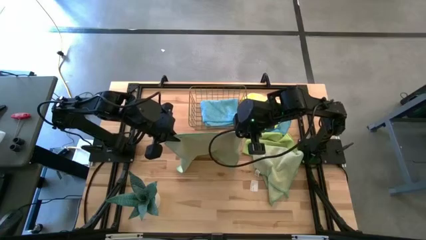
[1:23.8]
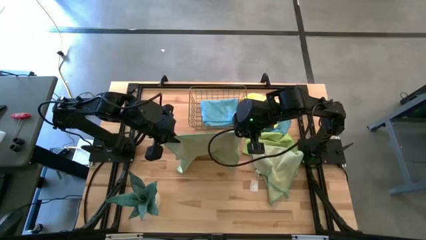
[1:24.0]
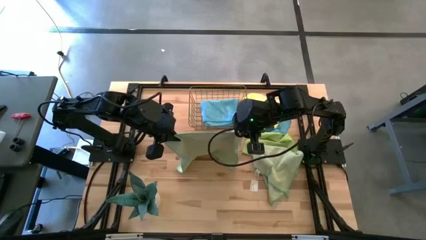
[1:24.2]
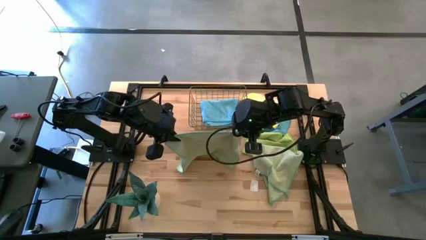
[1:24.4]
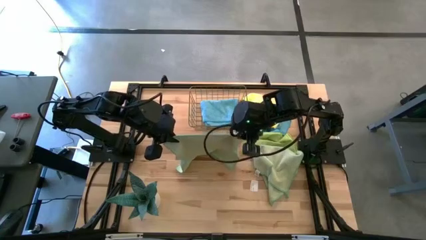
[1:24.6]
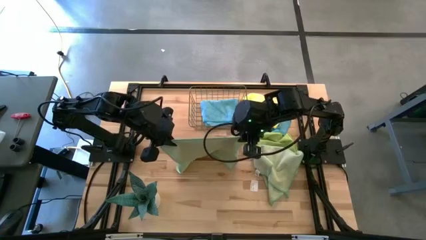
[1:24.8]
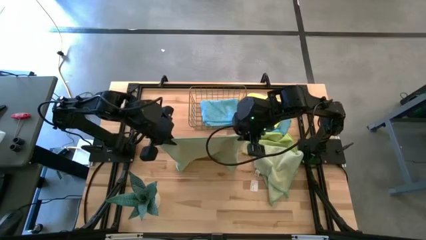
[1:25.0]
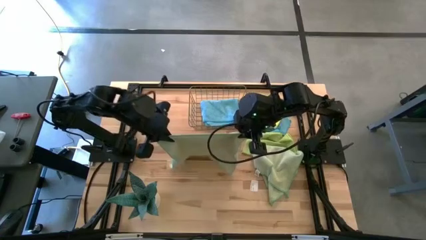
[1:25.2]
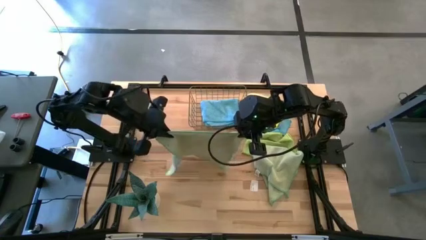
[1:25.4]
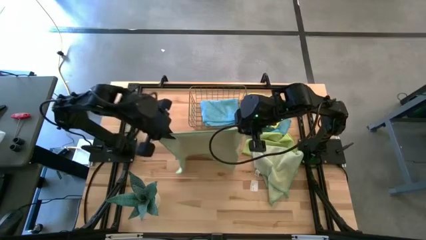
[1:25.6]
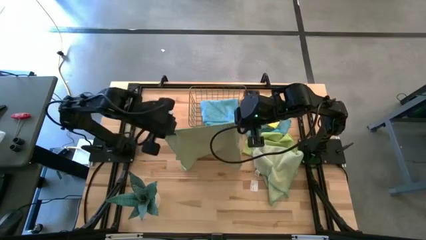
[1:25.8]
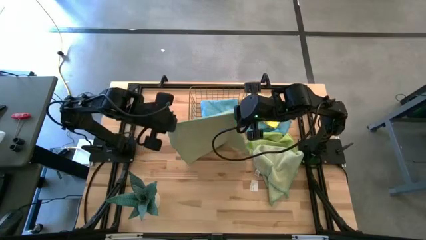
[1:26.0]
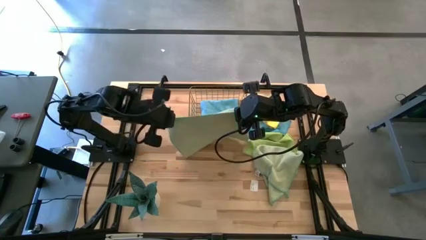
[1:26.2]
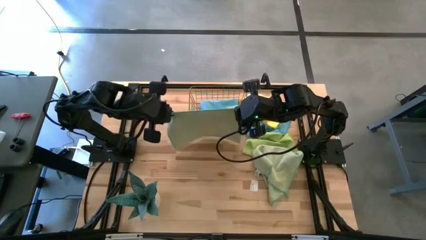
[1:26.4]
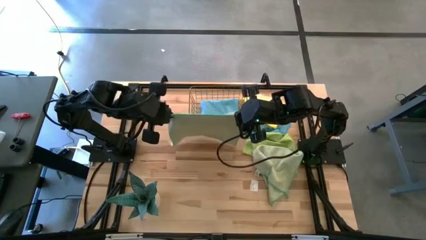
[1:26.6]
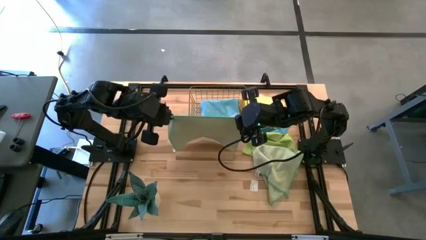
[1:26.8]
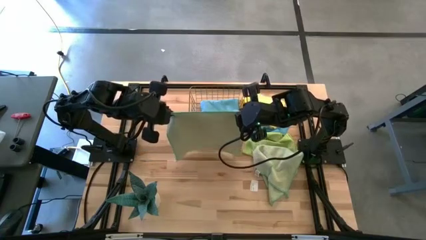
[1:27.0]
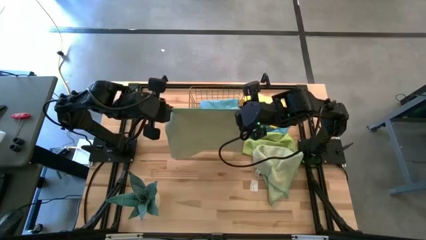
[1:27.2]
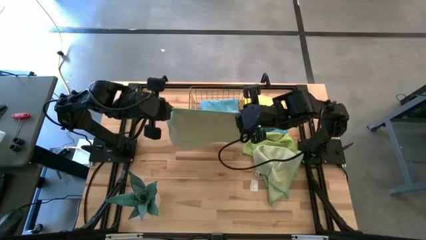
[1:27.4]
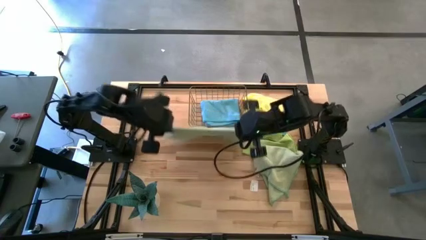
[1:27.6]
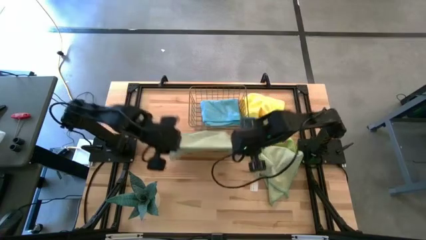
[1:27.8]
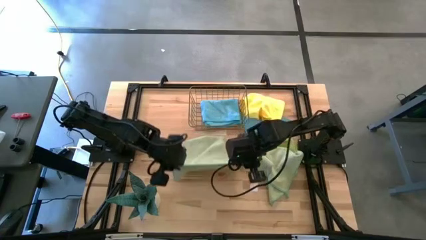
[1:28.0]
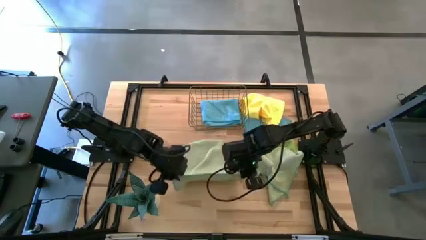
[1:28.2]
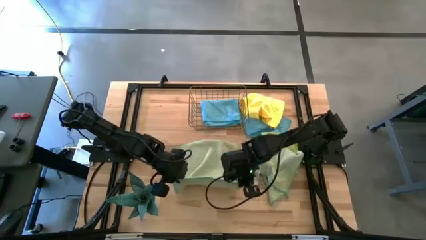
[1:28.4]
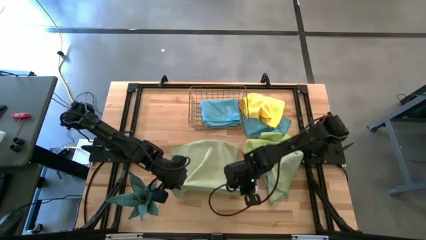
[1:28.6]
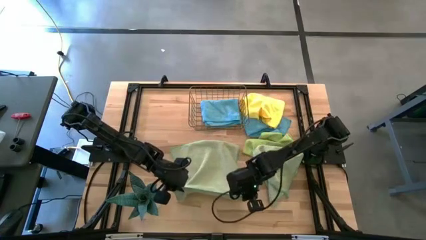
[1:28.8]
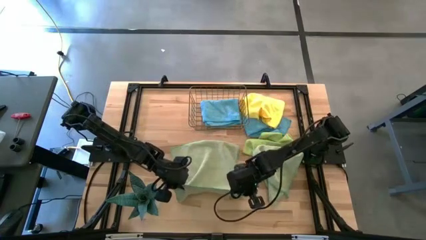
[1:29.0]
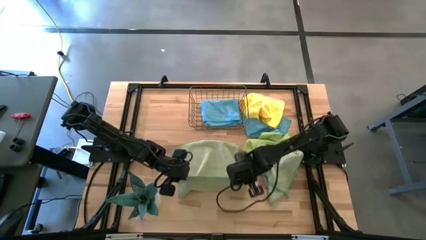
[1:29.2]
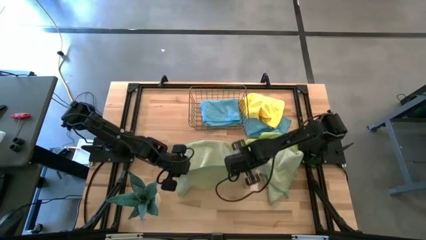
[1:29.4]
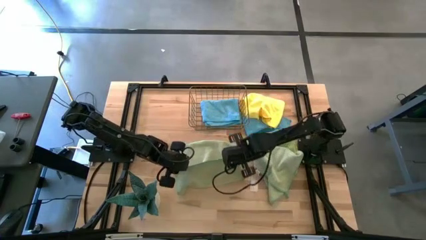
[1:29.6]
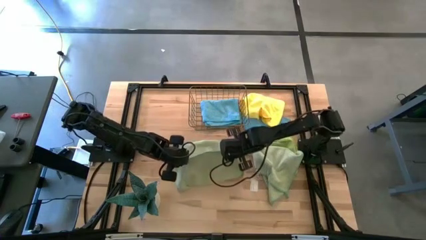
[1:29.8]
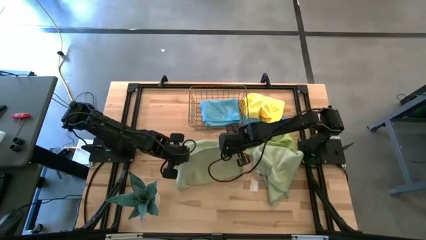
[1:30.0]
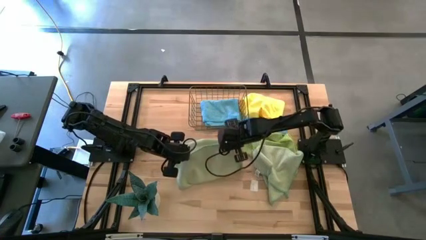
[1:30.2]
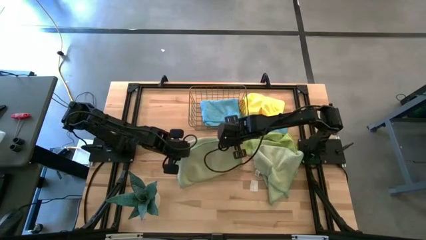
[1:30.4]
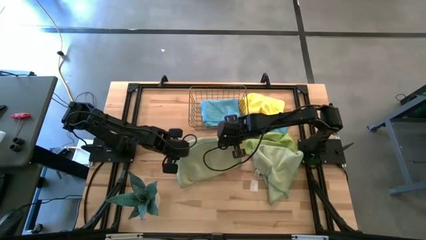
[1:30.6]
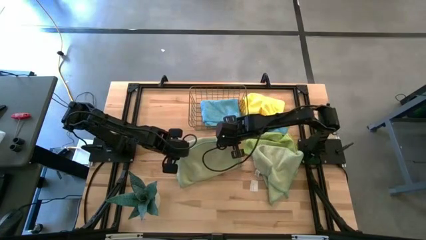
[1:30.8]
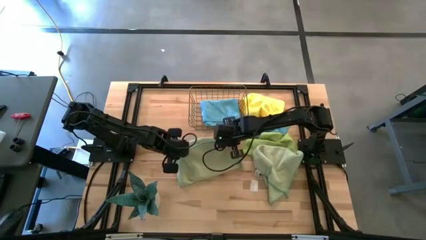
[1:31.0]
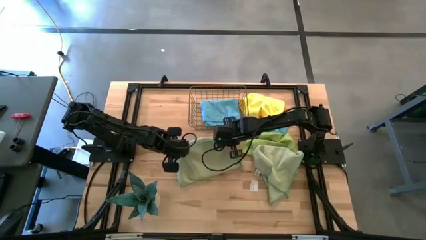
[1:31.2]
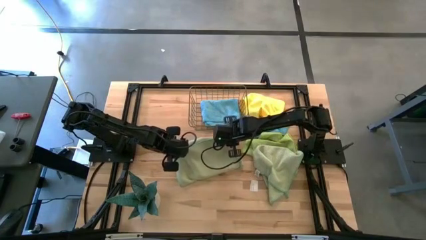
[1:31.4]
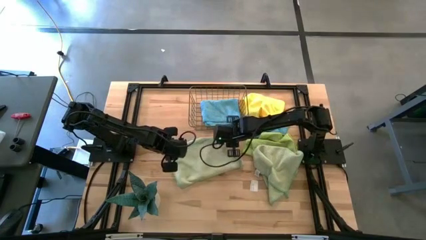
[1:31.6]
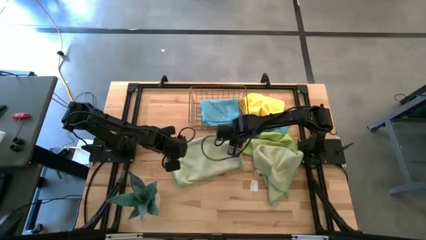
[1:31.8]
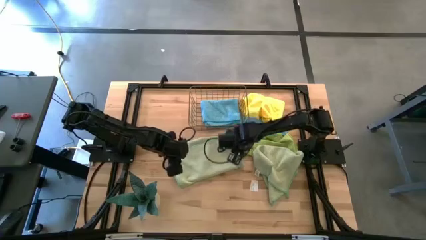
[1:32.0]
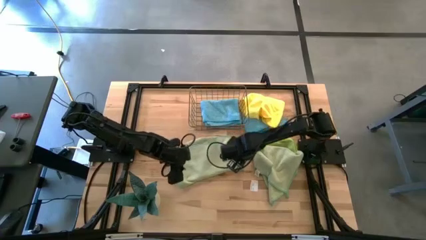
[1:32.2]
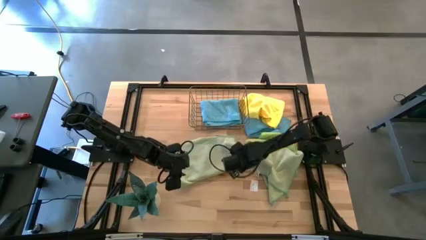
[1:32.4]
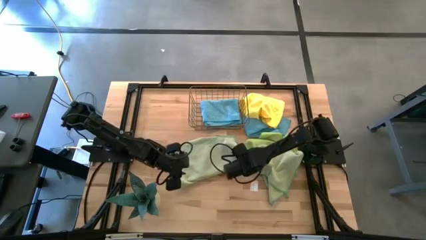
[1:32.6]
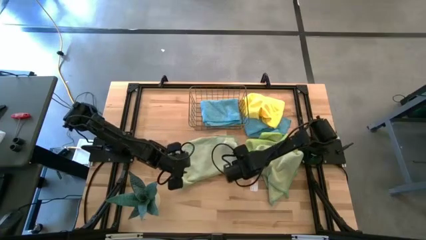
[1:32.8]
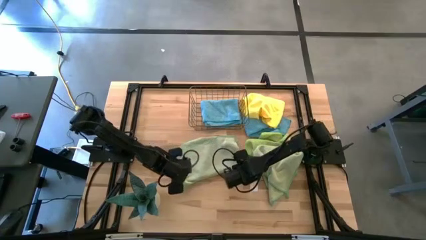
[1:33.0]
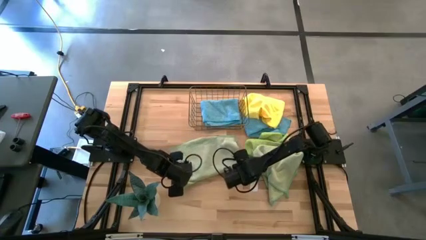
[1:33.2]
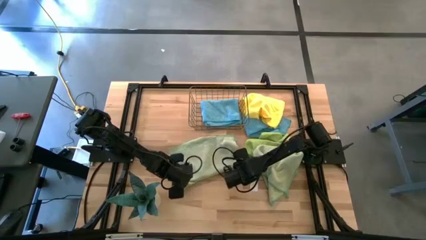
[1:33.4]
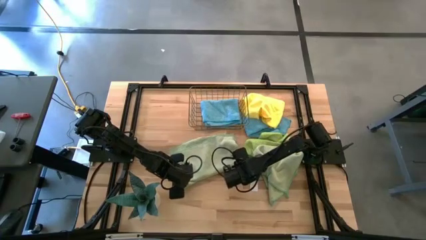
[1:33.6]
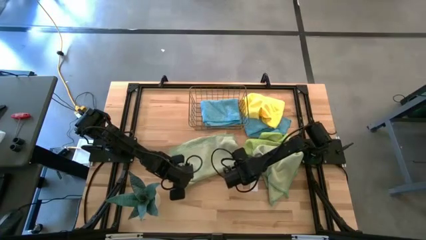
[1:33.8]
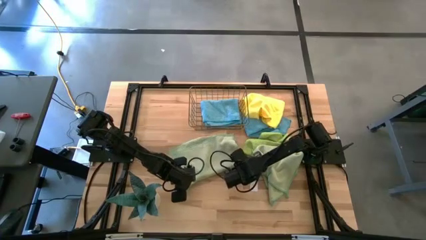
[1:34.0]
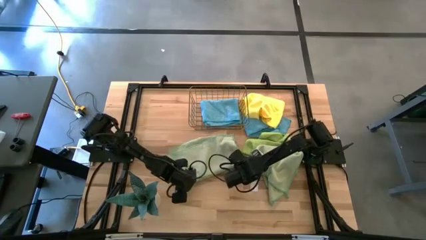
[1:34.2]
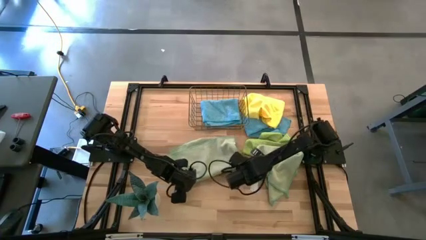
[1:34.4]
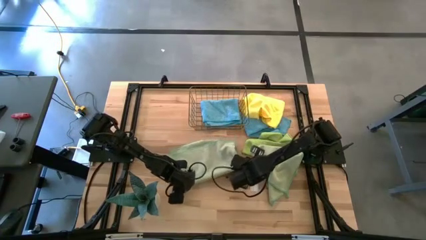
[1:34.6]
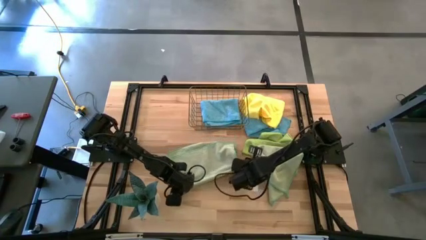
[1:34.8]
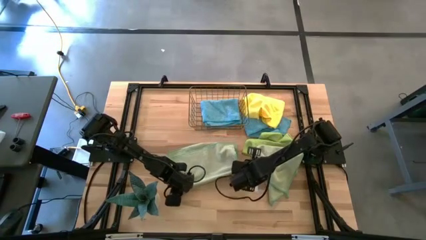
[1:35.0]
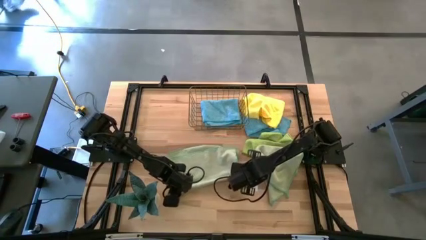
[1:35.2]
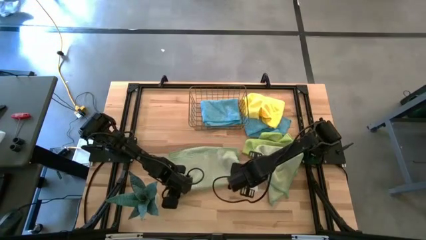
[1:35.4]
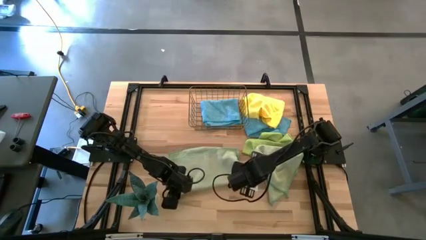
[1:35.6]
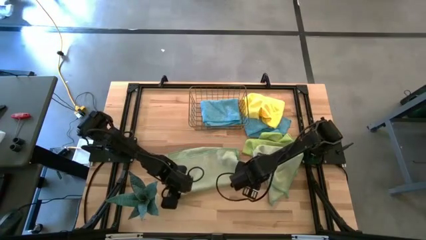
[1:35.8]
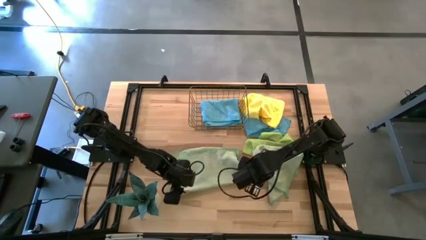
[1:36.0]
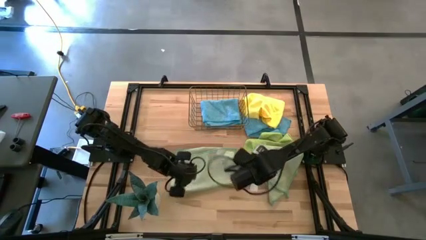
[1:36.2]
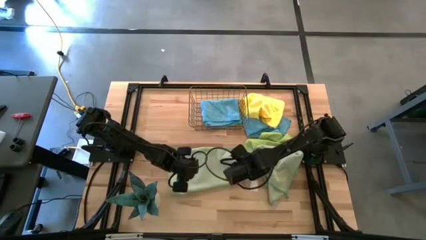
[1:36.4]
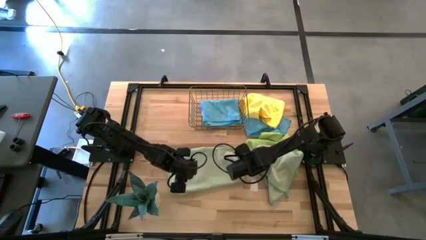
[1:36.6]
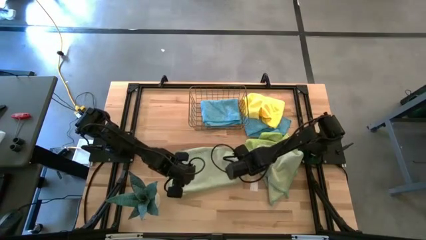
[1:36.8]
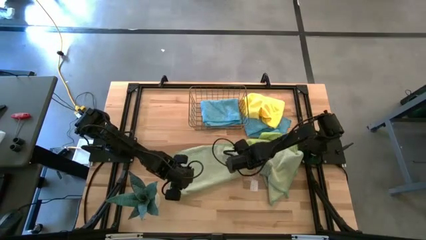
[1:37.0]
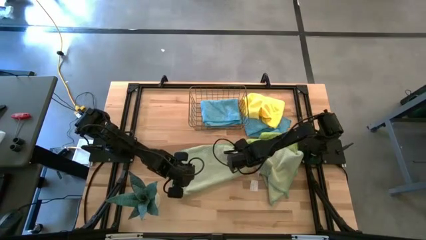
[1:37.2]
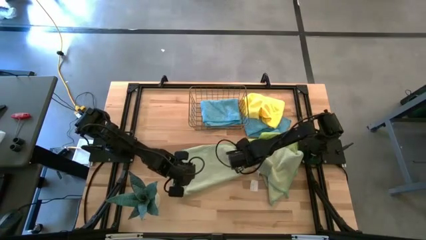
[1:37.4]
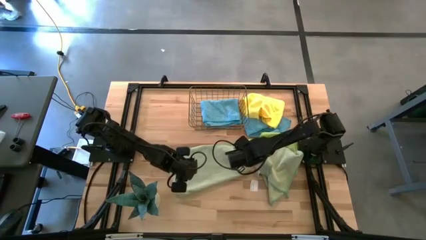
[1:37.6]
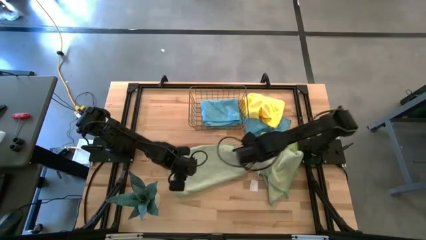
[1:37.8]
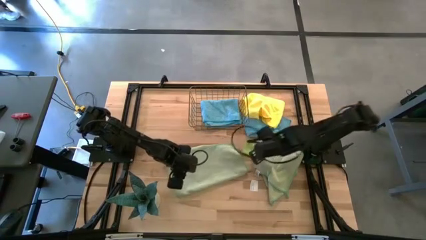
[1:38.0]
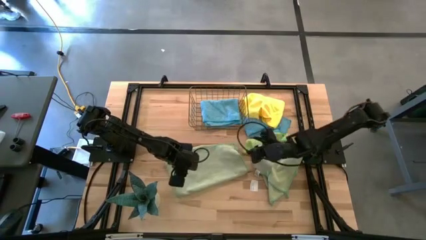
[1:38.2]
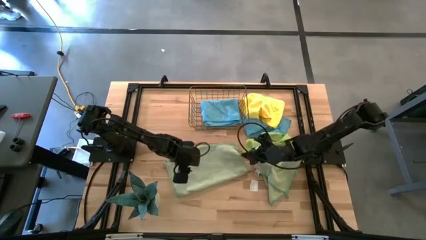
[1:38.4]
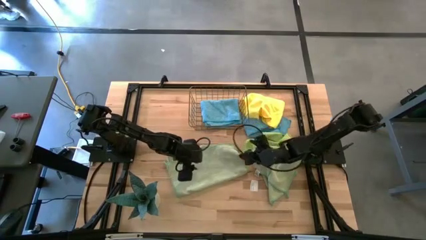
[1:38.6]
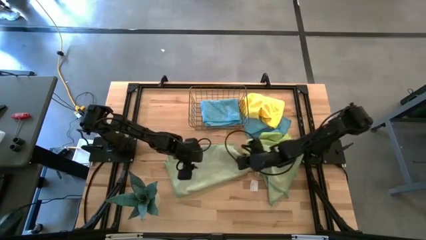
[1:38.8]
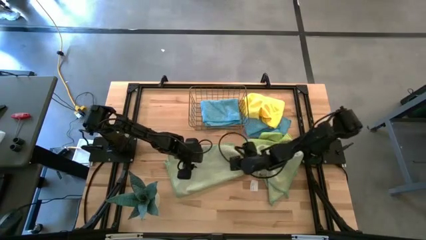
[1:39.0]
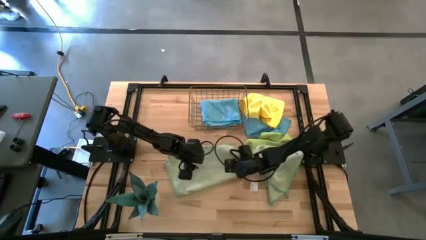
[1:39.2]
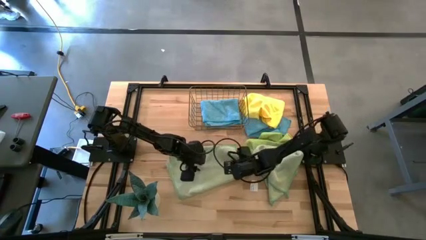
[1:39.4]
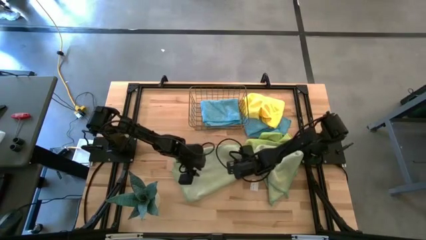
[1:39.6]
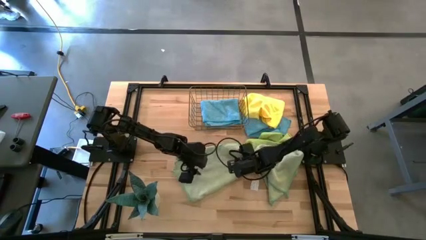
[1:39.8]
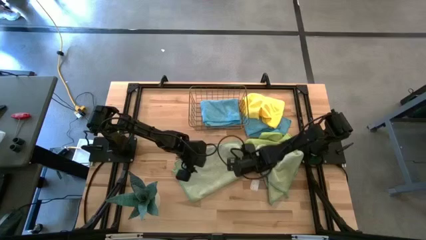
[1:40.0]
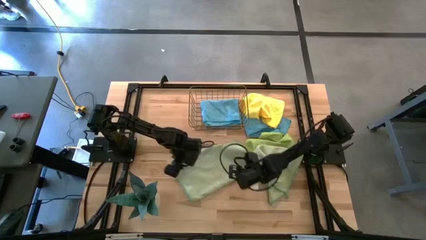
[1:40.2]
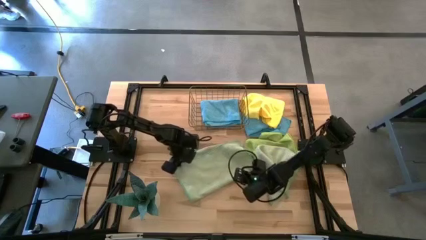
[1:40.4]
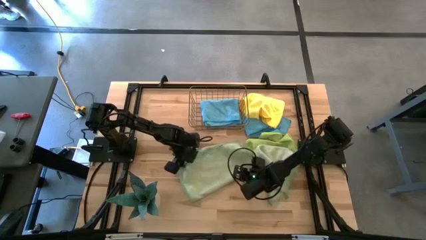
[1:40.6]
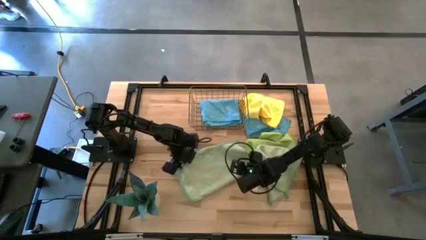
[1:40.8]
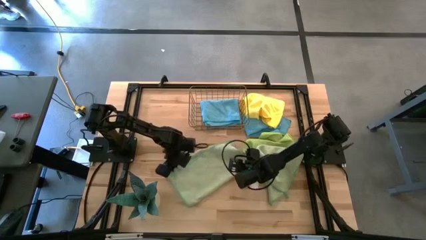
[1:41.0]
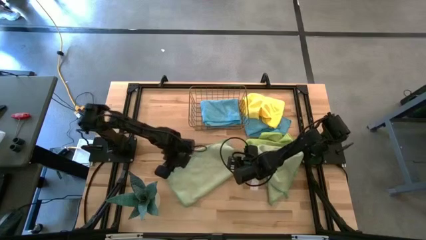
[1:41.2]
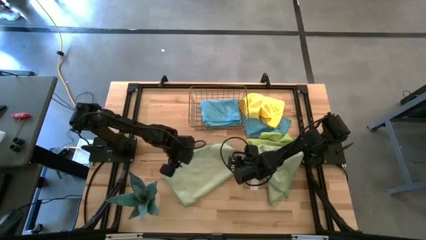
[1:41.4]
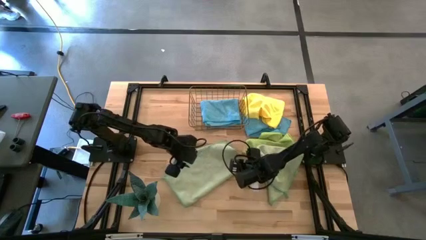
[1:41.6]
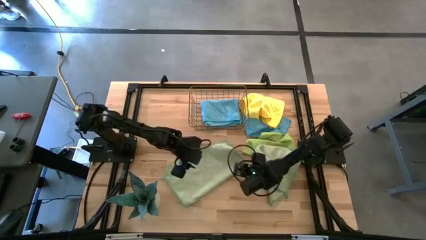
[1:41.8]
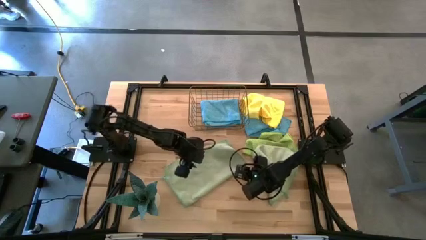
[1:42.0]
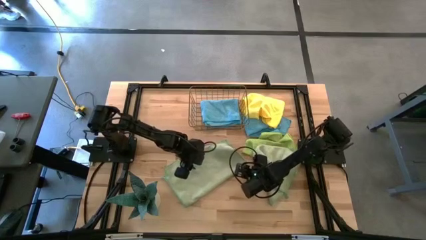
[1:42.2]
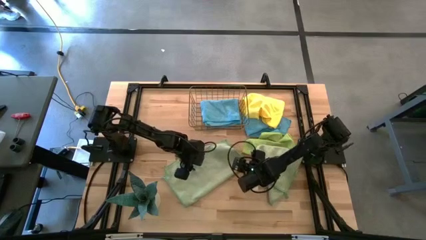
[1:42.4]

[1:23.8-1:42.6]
Task: Fold microfiber towels
Fold the left light green towel
